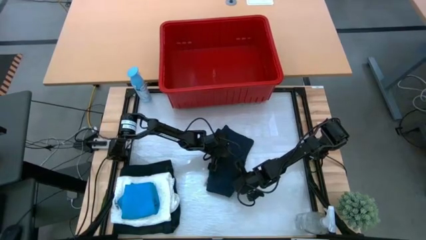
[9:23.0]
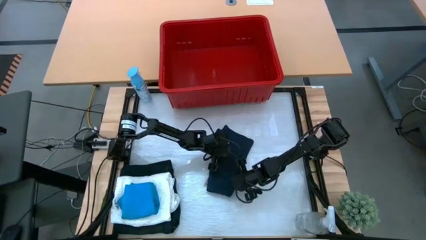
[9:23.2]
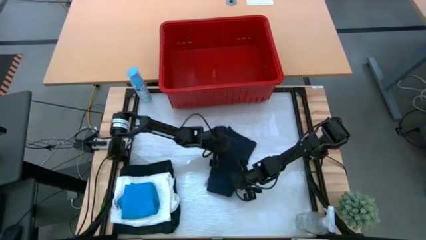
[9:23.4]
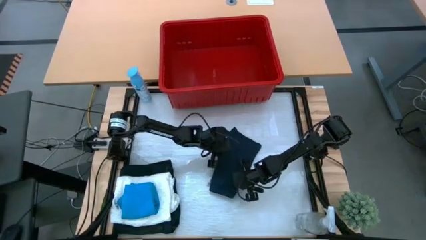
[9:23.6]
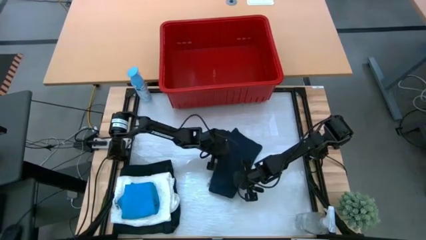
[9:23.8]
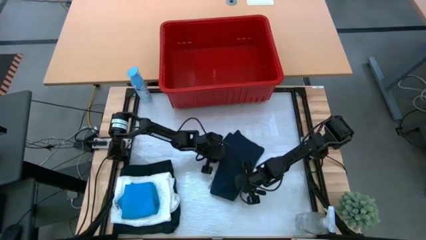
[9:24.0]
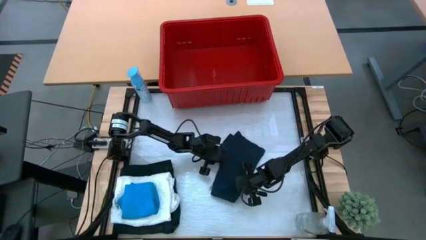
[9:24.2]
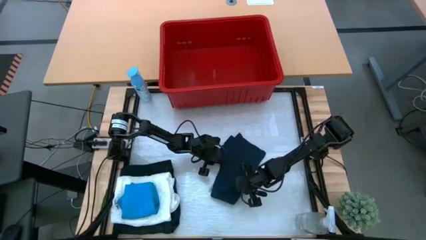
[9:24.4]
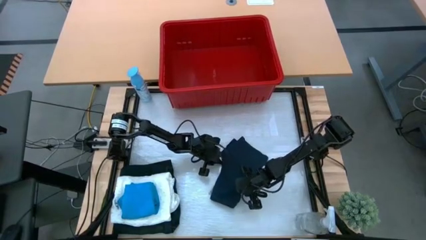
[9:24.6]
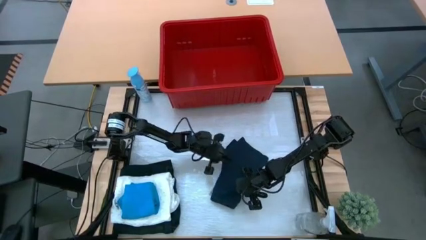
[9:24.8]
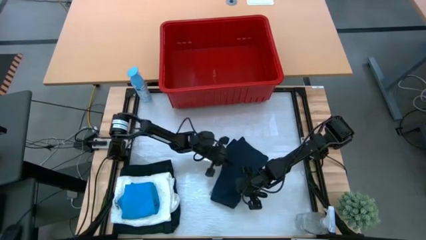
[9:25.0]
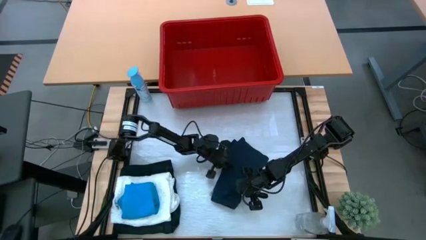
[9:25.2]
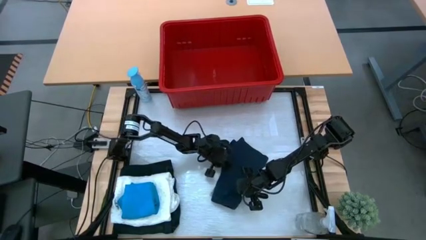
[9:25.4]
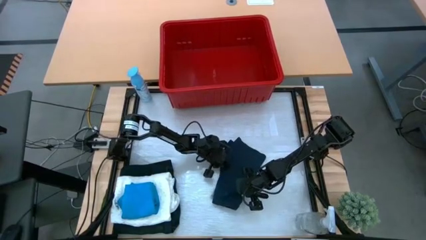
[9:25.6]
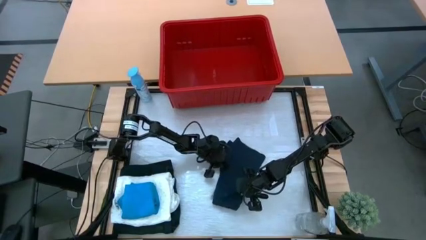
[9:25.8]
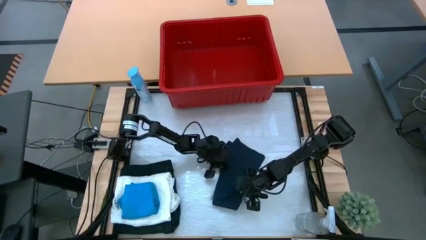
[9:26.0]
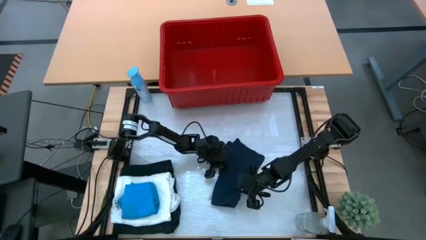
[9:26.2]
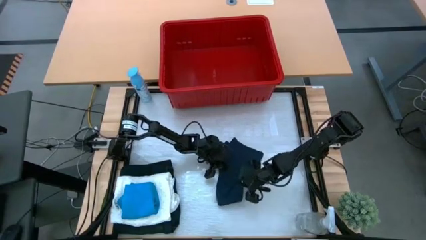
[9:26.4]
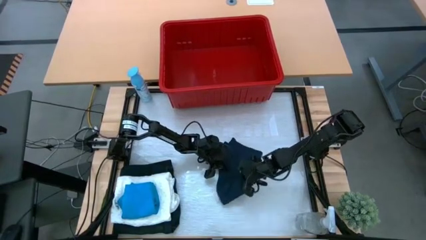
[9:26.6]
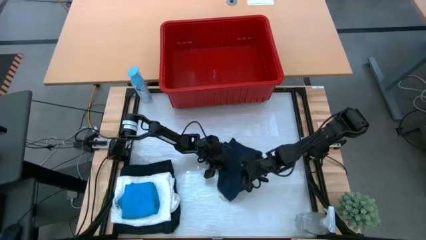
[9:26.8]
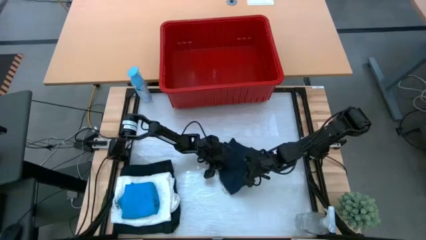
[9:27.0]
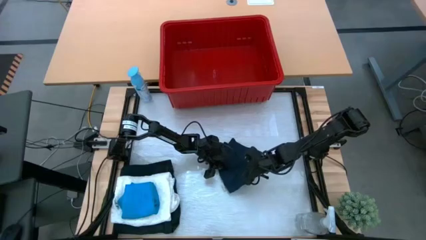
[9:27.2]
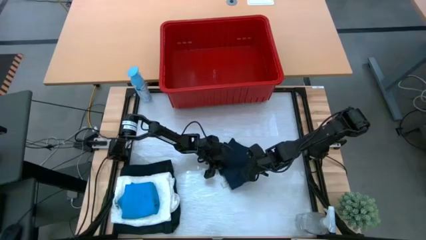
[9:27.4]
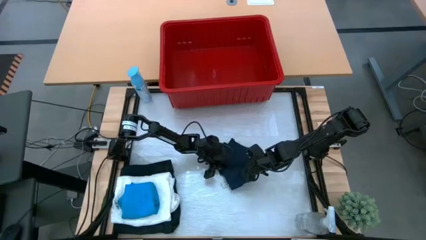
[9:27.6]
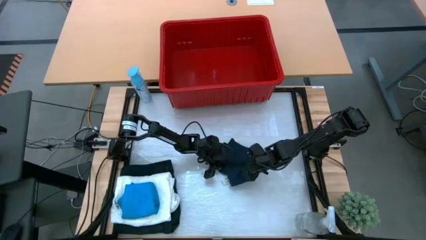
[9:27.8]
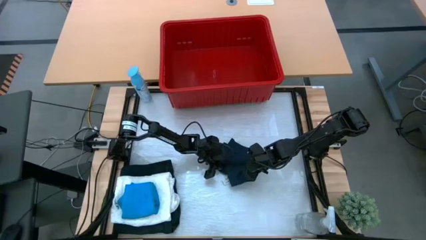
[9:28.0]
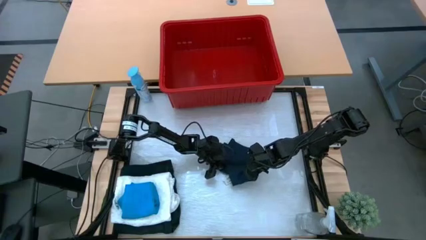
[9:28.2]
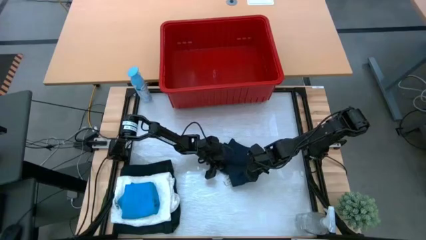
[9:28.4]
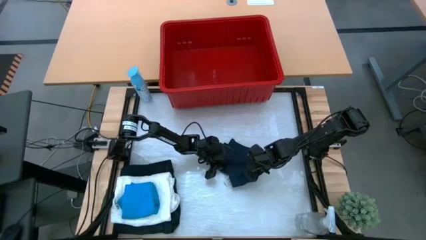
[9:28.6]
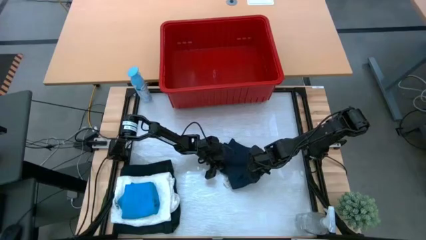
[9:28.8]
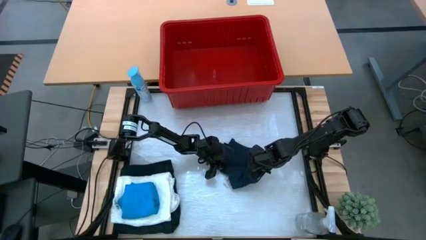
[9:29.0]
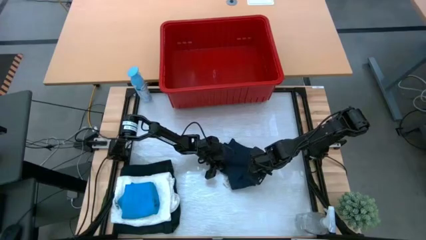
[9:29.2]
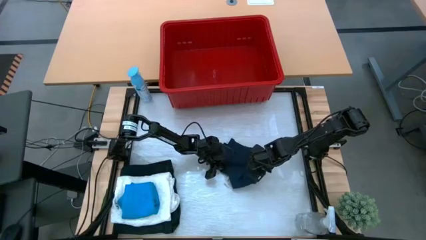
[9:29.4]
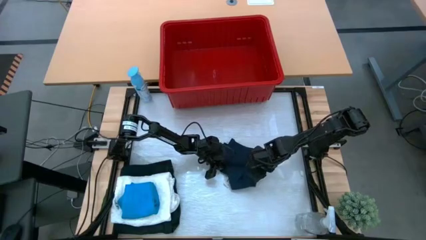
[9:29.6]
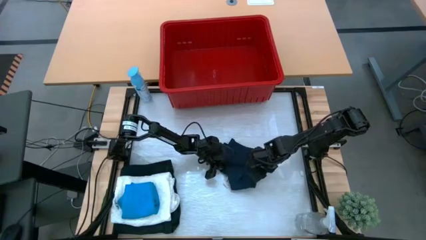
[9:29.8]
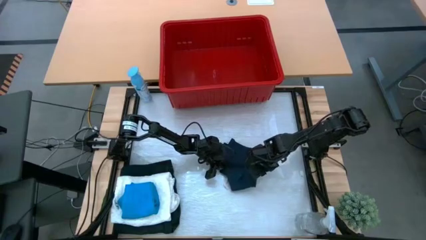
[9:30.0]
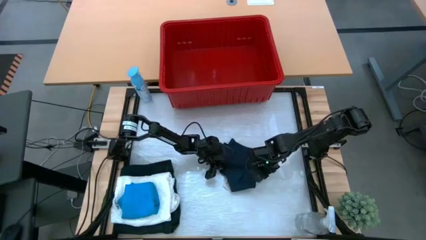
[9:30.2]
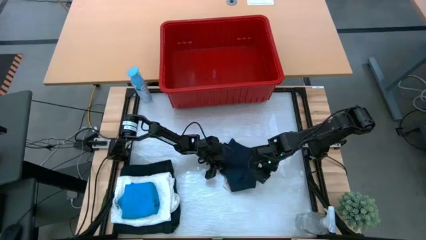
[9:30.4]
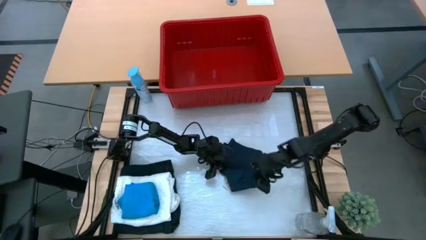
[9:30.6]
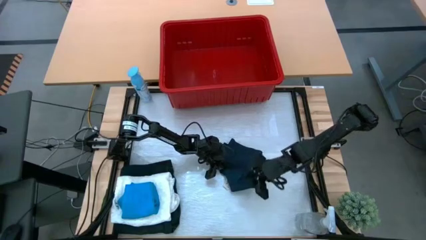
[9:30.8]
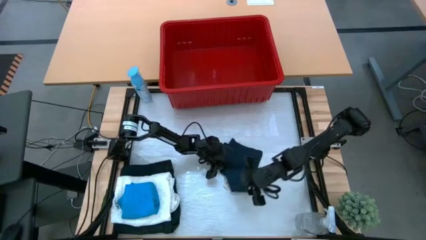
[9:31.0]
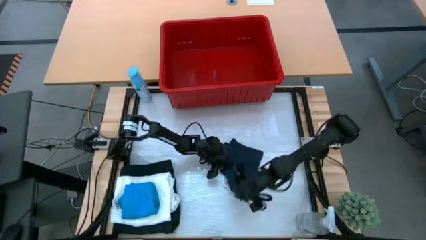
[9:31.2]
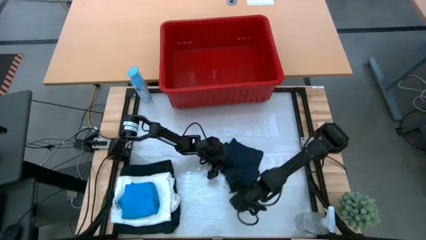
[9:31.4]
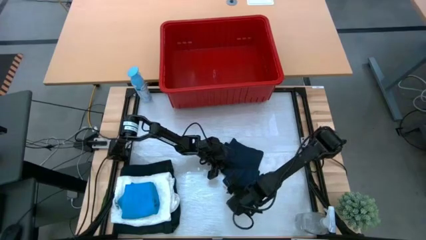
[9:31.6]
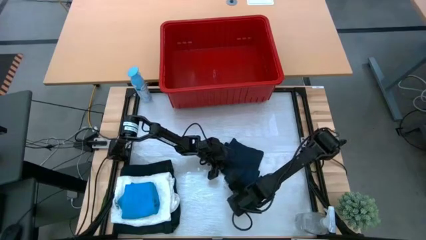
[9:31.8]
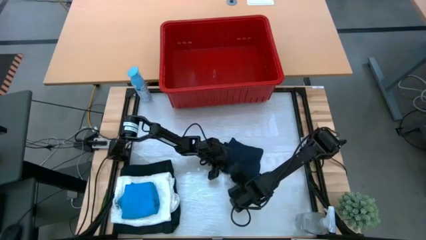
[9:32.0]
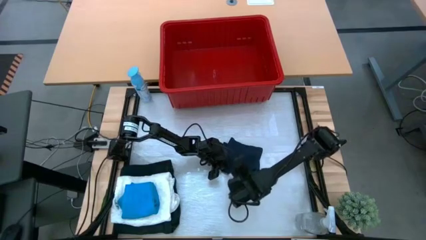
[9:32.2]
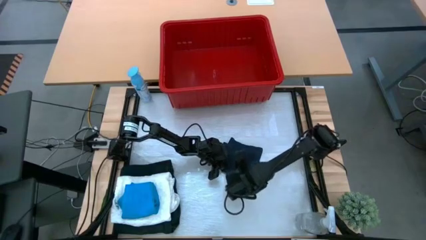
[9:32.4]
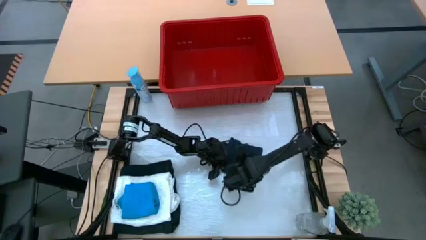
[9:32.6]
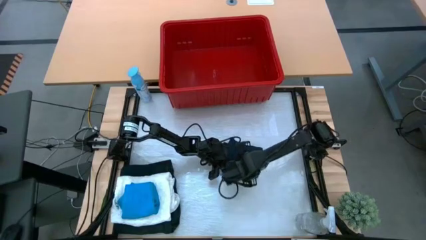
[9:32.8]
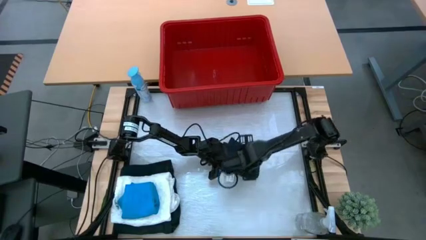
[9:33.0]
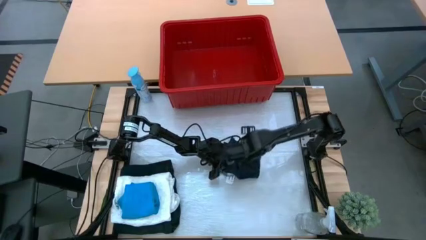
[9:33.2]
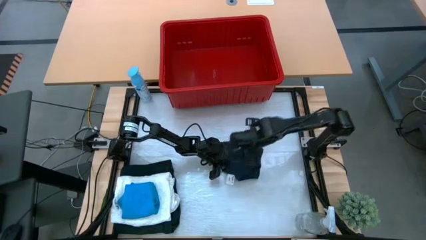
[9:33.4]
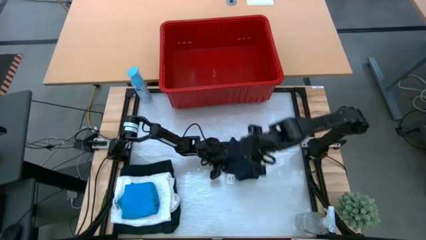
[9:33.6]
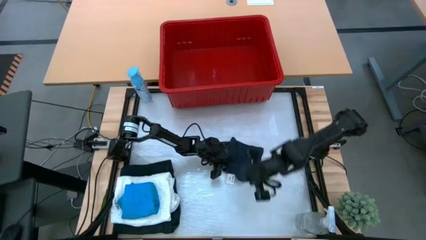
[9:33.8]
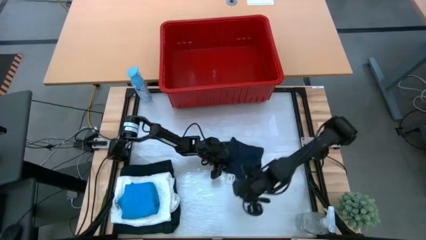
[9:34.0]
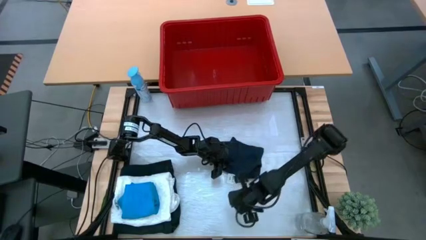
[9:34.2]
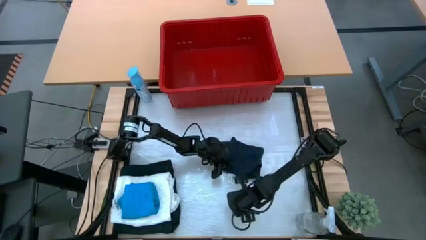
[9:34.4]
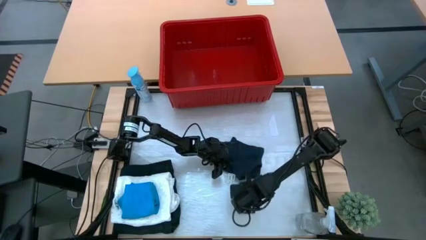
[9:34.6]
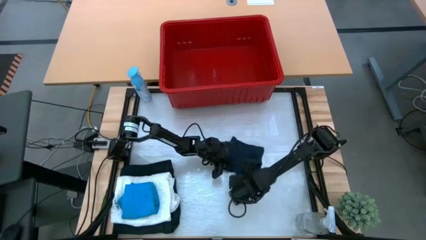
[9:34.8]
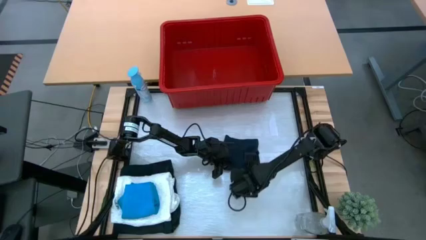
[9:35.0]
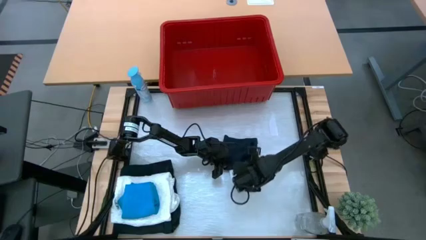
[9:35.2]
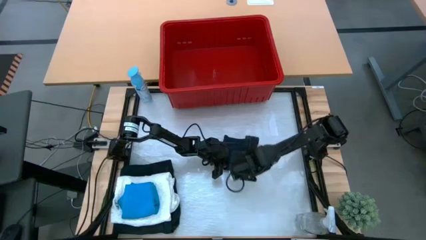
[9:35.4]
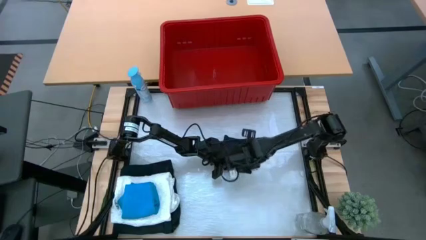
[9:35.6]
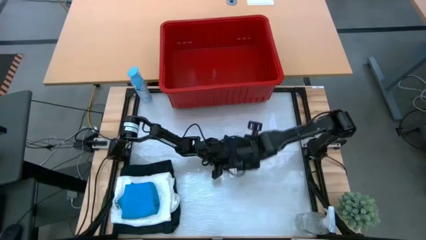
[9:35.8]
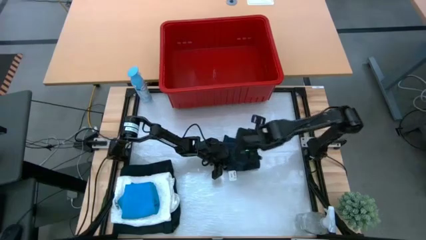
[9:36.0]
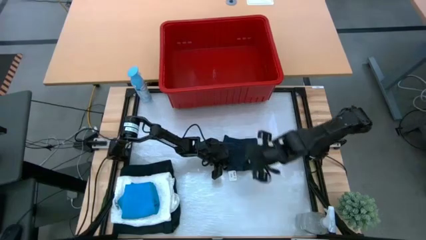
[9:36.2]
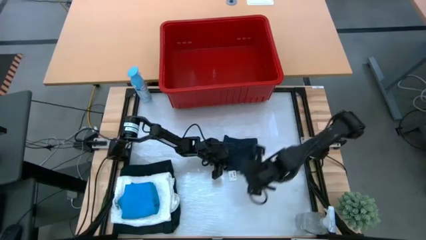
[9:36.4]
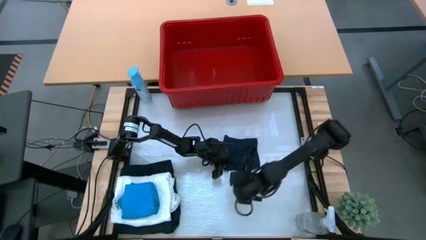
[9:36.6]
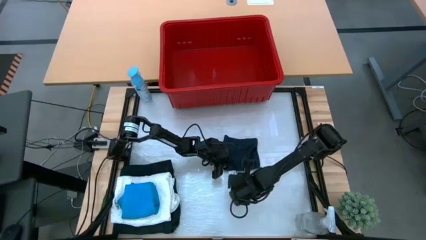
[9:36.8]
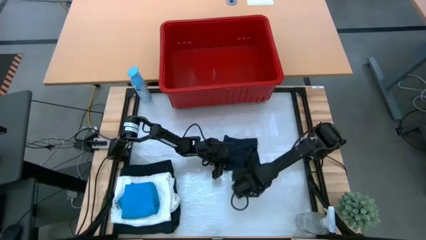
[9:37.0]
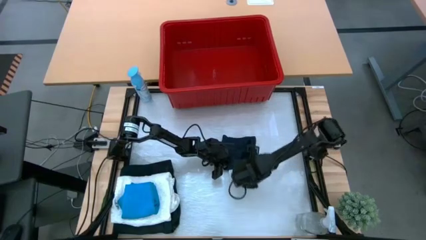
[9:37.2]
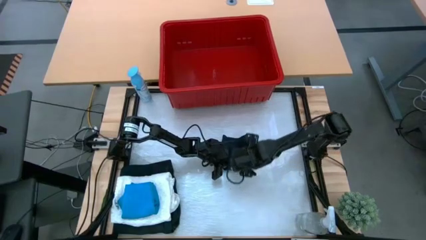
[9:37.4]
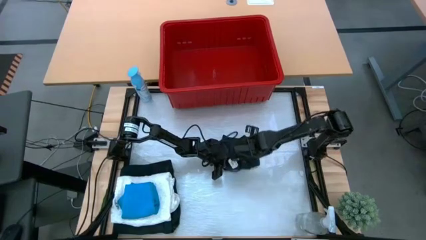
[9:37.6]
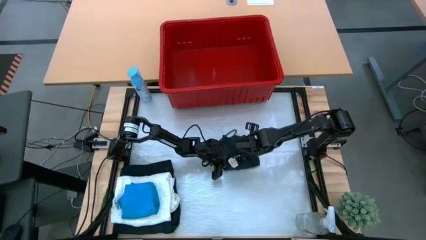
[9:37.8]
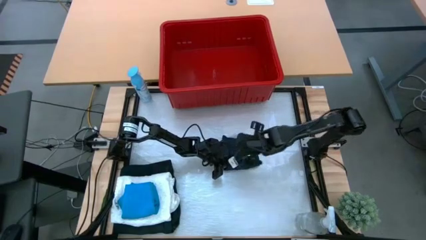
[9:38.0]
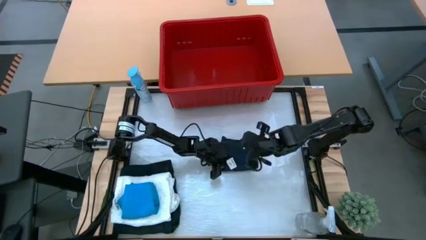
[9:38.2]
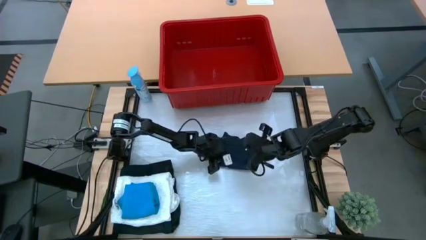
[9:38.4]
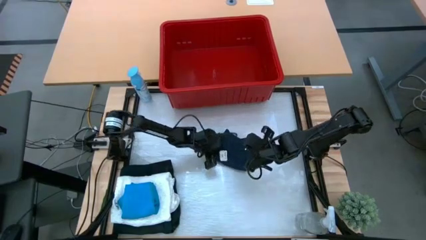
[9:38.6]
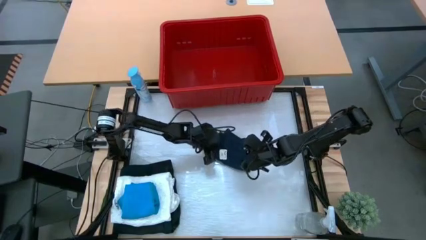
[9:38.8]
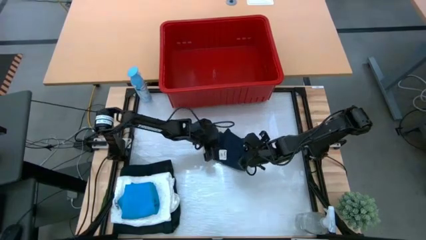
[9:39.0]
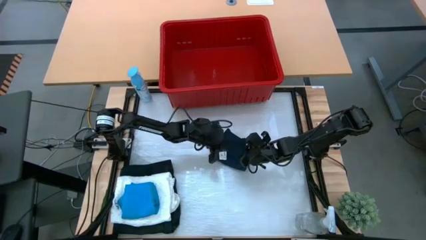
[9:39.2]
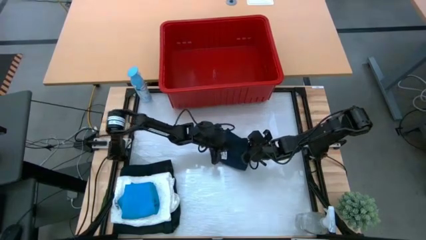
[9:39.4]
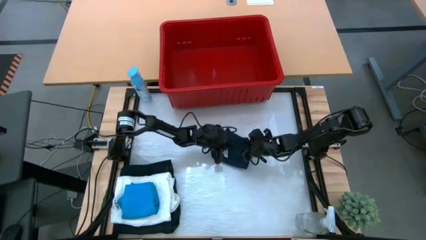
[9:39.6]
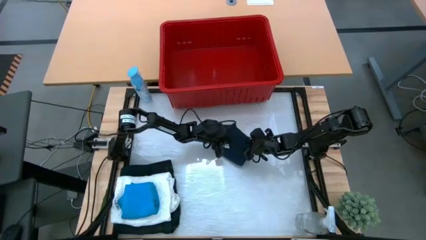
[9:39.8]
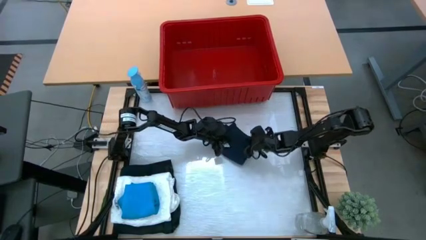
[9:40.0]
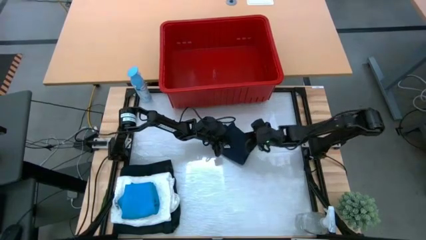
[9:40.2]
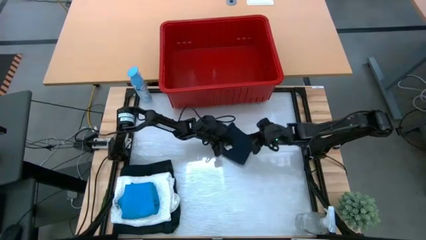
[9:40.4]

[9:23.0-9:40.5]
Task: Fold Laundry from Bin
Fold the gray shorts from the red bin
